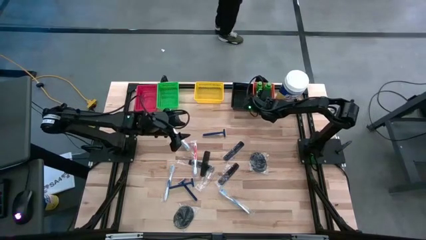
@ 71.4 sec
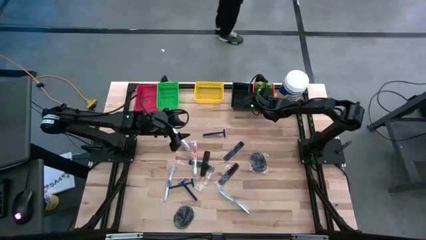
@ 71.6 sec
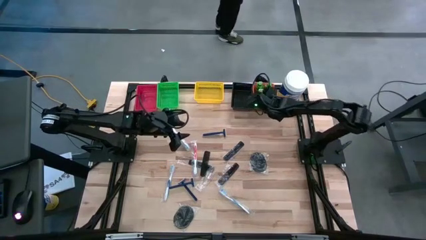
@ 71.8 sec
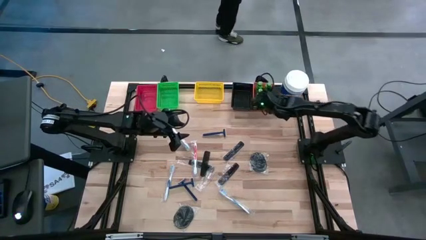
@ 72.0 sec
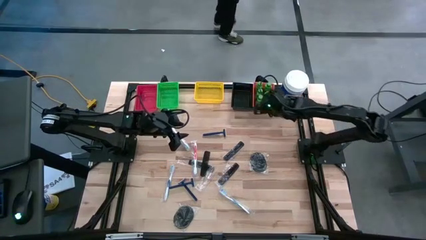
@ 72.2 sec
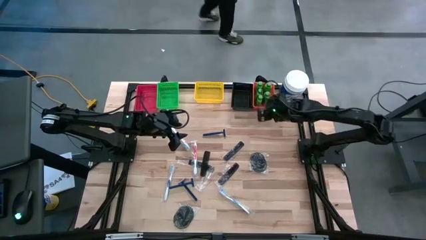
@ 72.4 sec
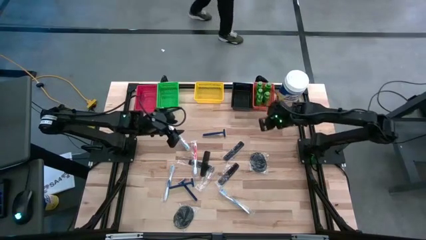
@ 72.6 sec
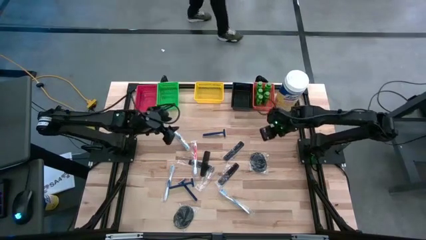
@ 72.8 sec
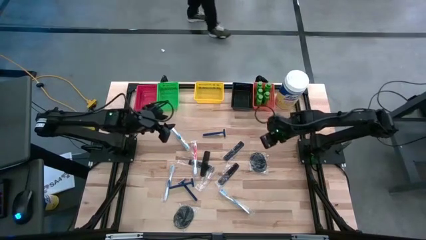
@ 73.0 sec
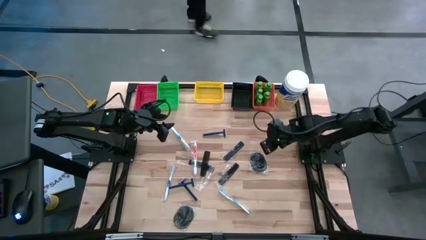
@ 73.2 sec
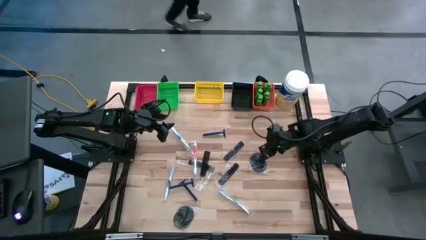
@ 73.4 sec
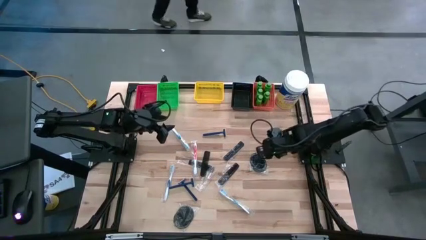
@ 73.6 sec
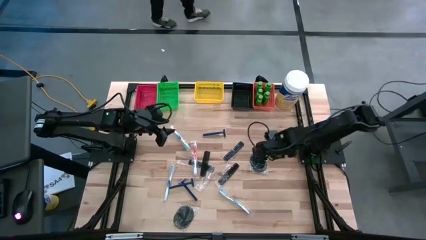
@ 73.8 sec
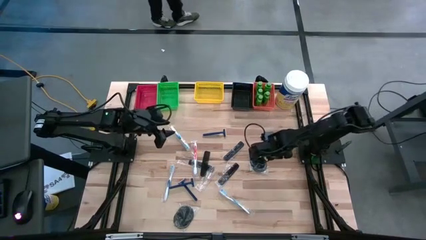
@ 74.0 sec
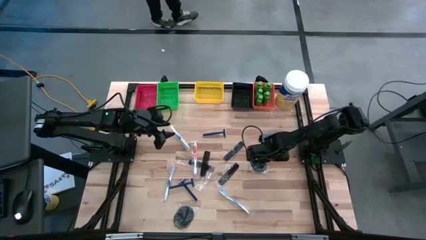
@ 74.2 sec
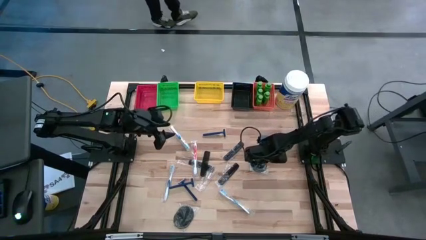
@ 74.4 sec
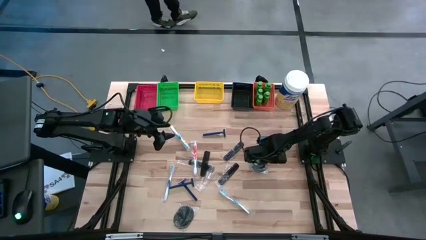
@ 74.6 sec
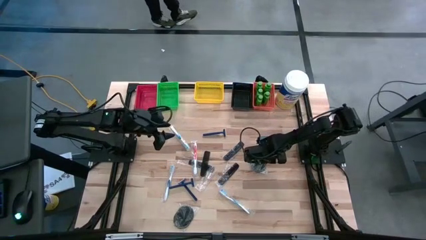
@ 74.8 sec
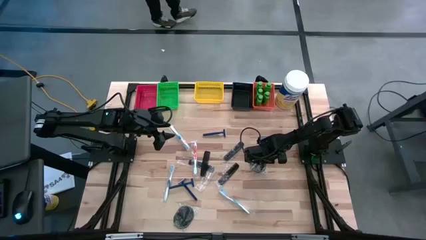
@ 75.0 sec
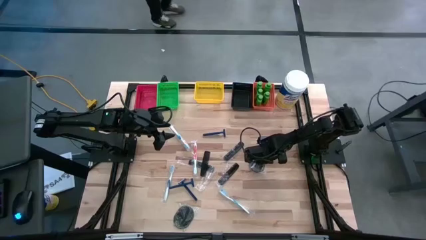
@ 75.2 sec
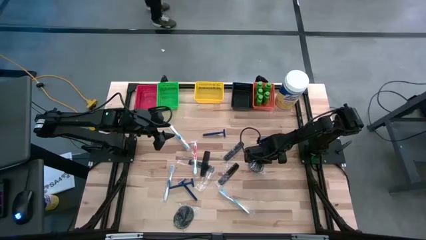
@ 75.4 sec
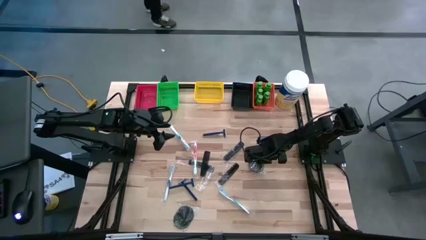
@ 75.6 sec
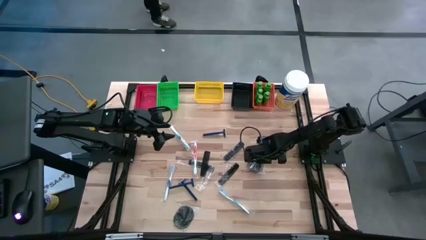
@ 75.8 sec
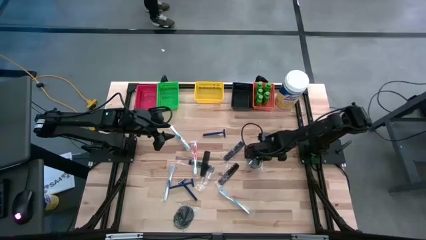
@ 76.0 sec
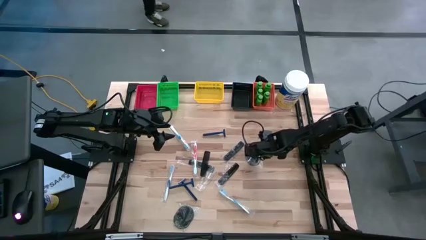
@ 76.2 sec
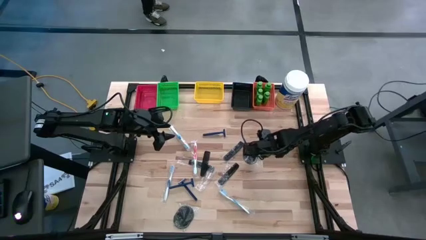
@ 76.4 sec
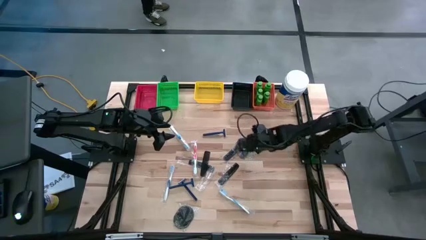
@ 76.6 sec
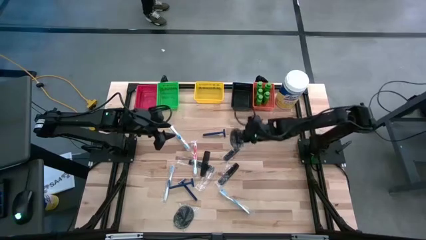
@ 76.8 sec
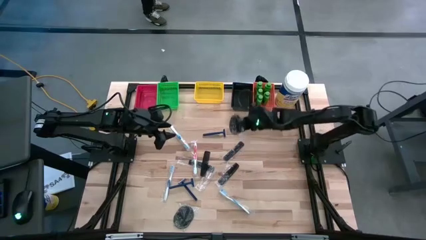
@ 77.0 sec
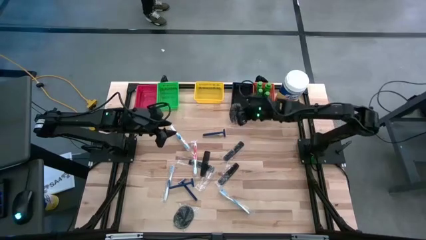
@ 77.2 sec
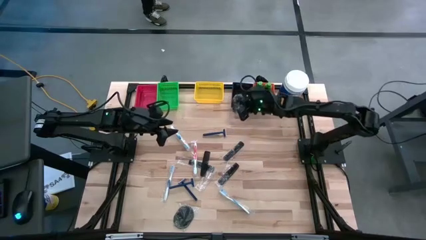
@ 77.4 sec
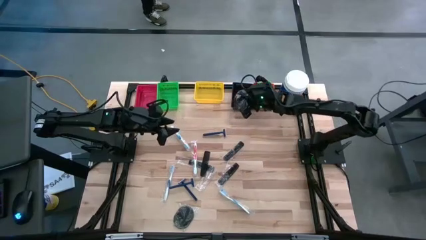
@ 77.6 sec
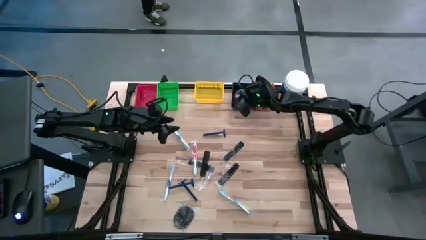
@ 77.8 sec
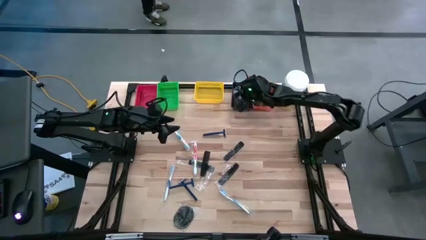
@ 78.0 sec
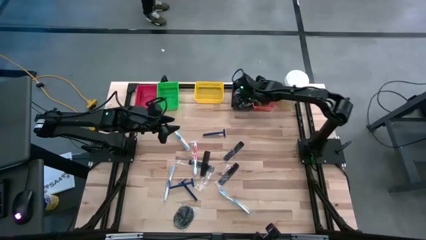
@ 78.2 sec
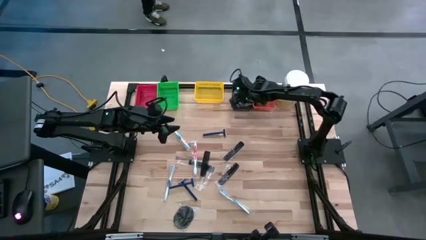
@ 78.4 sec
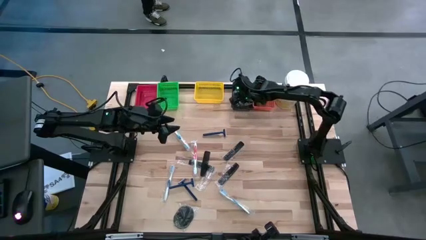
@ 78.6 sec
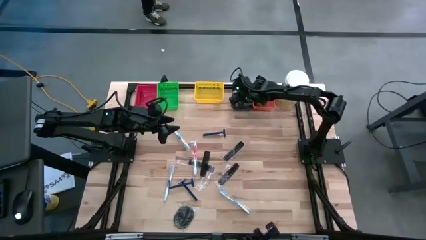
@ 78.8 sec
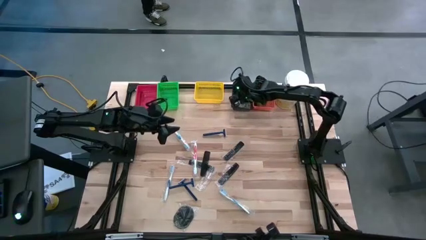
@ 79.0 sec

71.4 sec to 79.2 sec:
Task: Pick & Place Travel size toiletries
Put the black hairbrush into the black bin

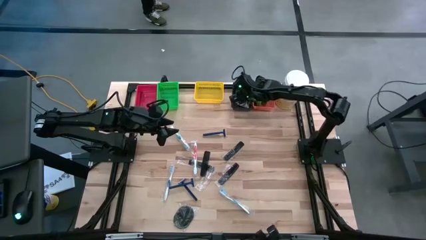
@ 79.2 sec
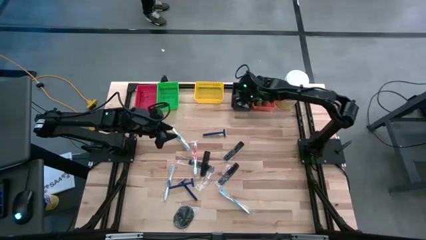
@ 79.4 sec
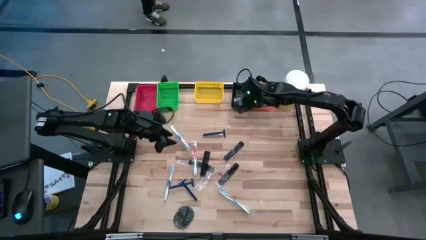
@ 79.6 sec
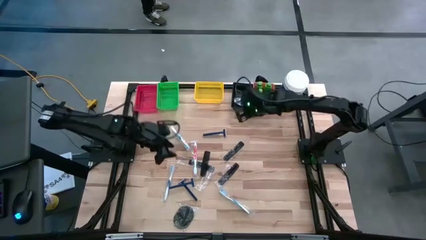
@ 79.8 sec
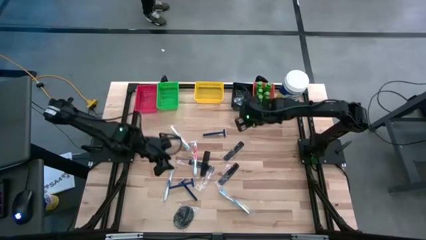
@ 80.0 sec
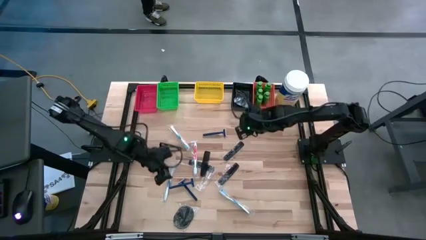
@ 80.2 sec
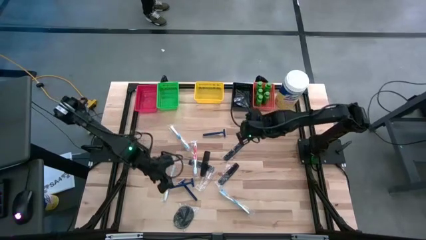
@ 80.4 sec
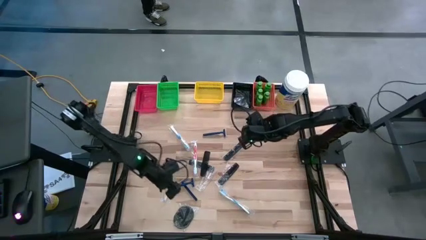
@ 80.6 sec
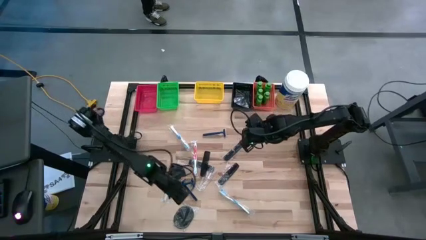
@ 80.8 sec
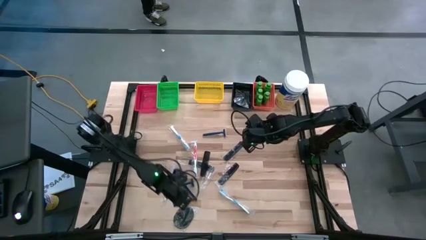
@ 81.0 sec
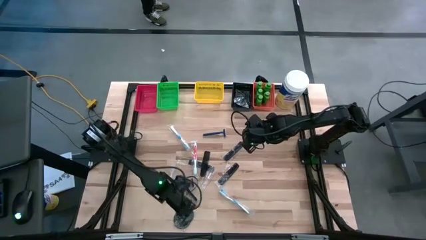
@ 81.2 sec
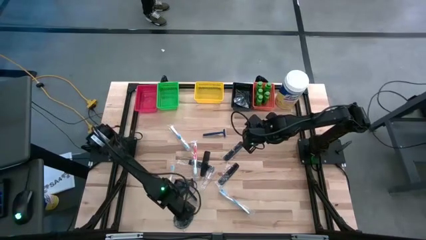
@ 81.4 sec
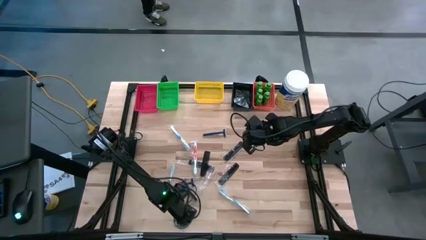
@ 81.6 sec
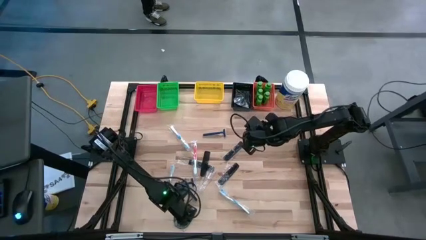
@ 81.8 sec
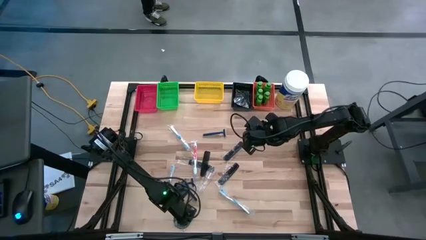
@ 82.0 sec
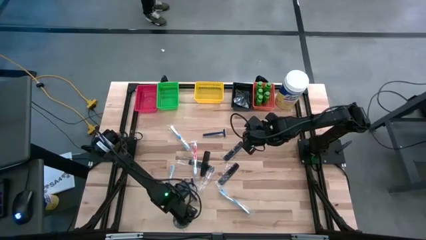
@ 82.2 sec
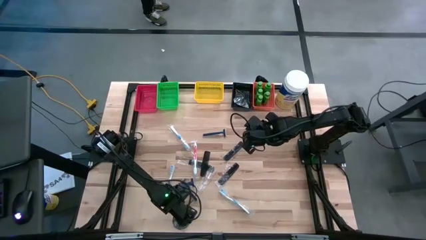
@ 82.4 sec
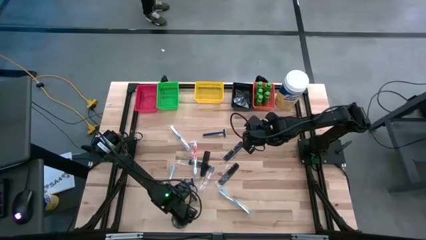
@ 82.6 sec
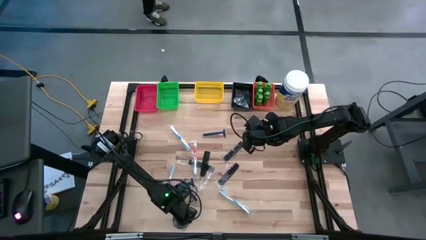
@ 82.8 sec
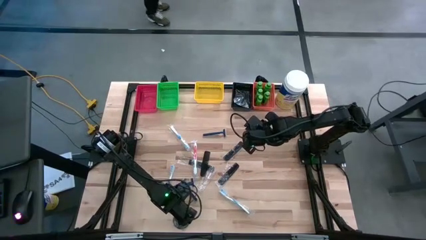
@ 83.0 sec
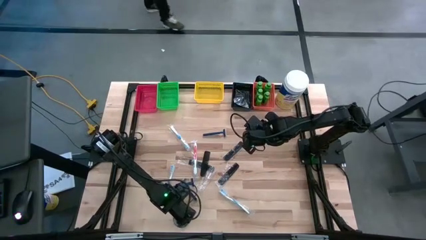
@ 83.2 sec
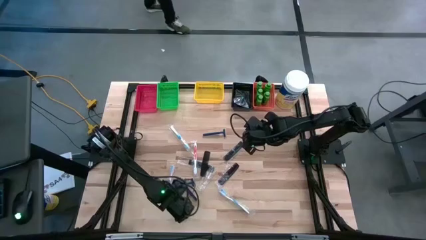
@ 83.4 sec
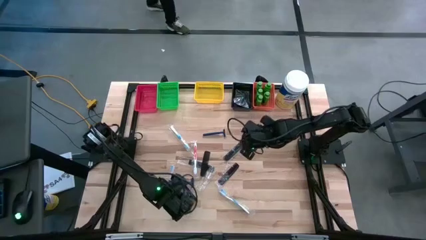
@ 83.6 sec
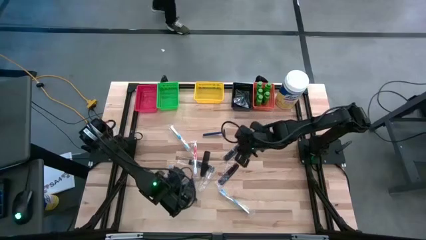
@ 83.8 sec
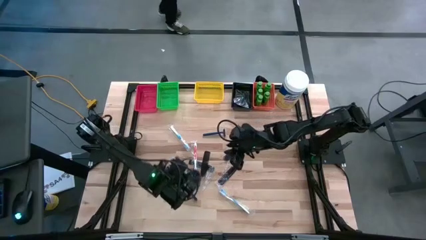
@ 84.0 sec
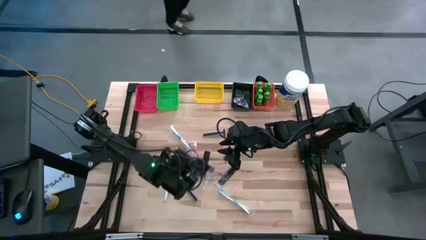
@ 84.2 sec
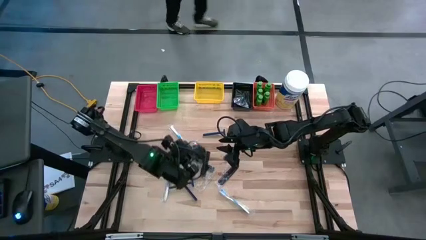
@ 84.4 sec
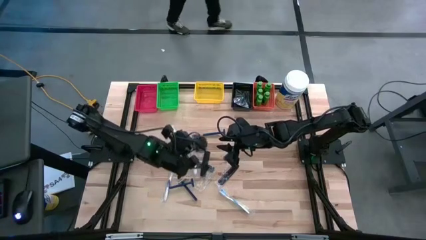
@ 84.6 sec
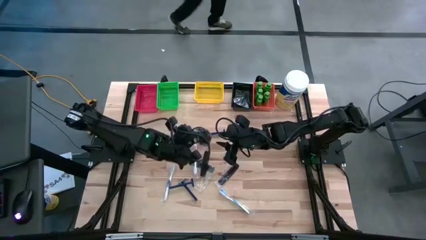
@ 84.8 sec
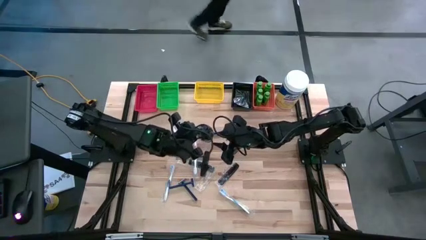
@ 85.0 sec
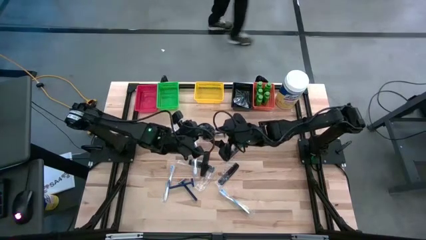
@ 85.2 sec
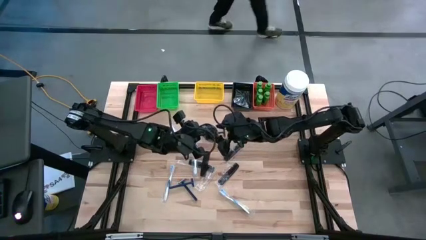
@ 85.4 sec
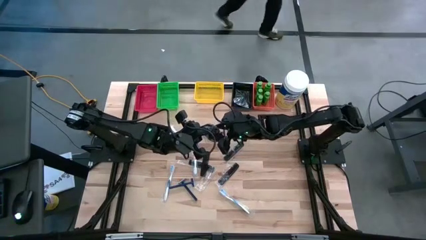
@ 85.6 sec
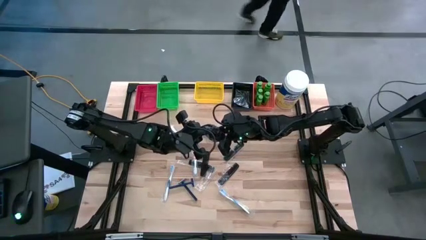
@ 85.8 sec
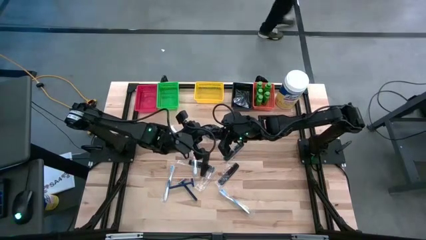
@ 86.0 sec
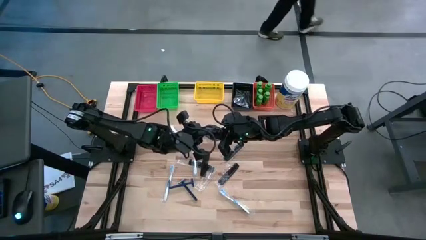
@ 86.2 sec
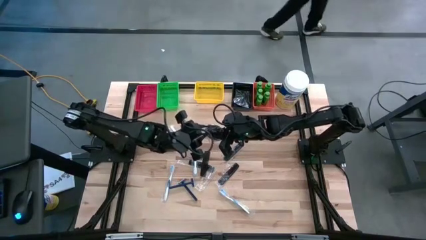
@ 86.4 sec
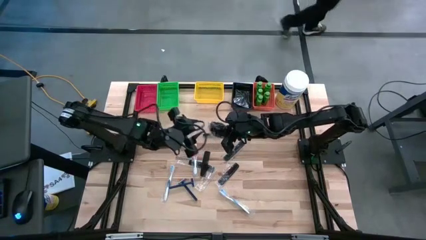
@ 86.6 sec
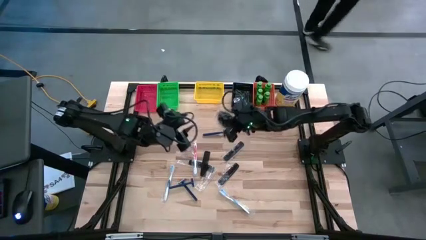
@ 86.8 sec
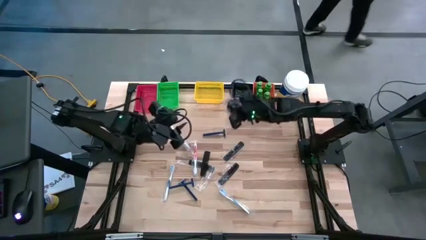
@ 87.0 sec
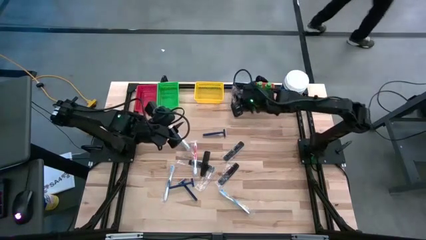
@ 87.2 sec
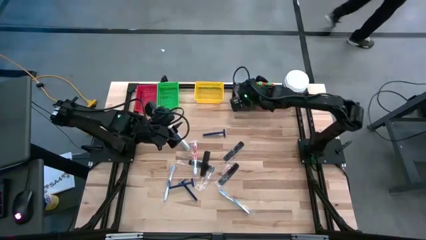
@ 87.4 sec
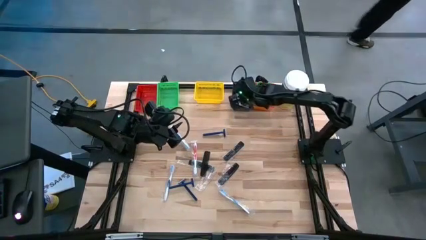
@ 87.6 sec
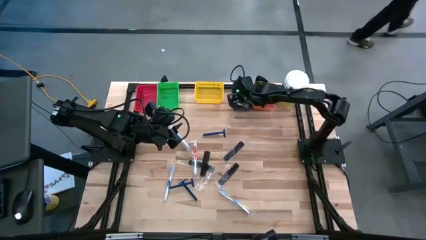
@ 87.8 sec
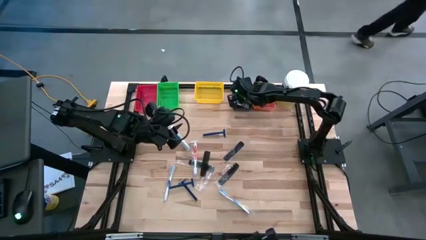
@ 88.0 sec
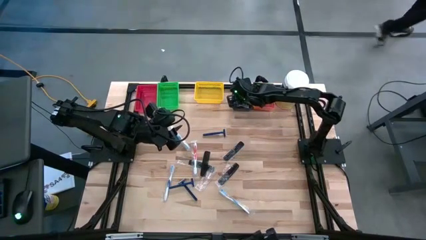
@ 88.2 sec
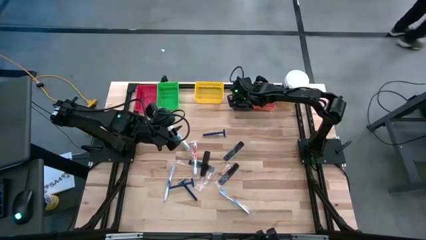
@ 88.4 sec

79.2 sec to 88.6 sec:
Put the black hairbrush into the black bin
